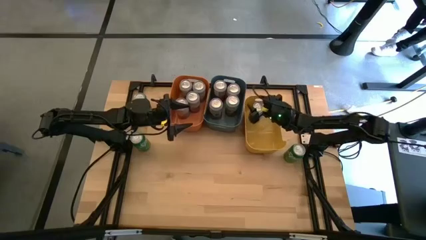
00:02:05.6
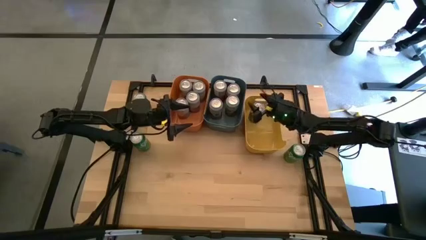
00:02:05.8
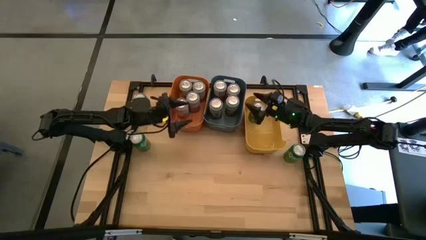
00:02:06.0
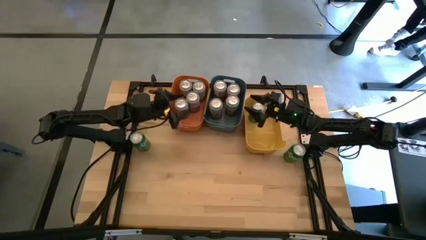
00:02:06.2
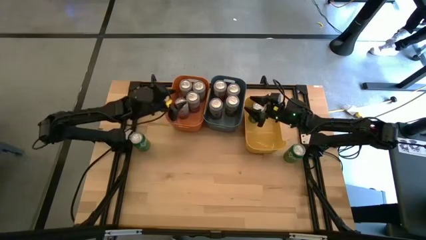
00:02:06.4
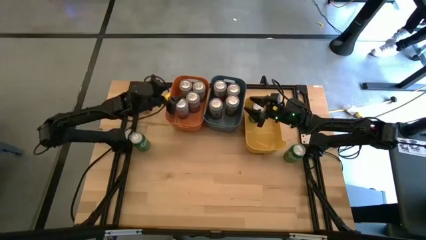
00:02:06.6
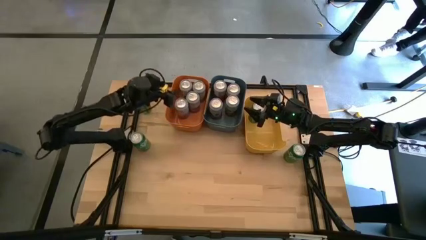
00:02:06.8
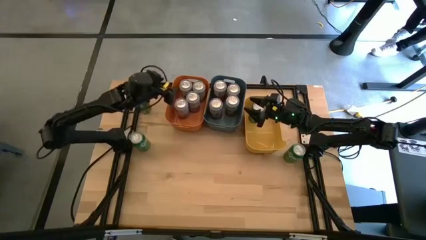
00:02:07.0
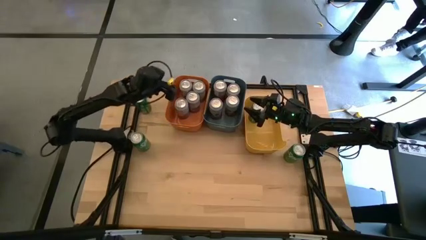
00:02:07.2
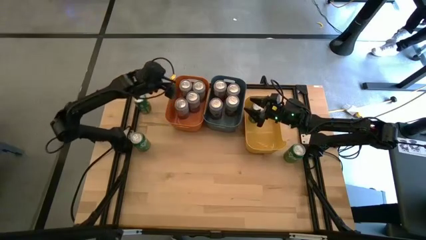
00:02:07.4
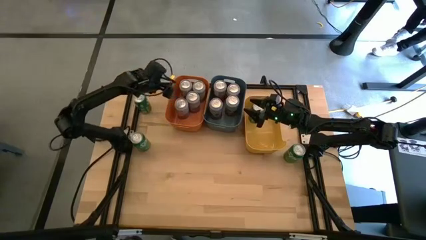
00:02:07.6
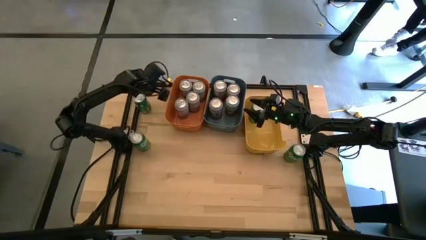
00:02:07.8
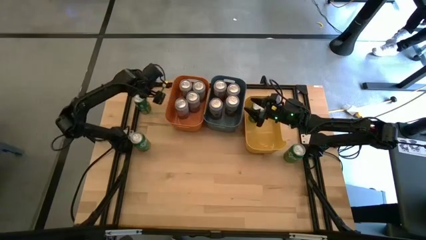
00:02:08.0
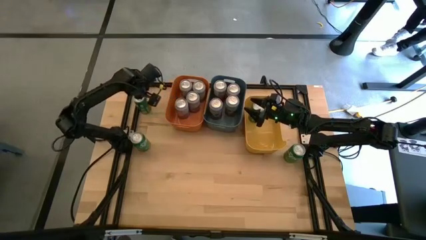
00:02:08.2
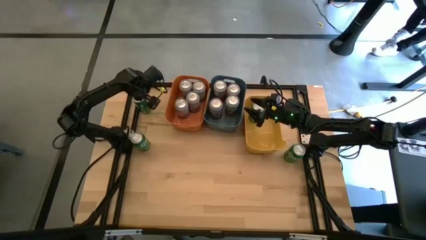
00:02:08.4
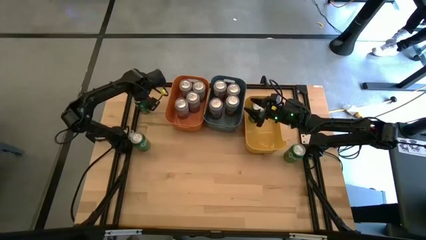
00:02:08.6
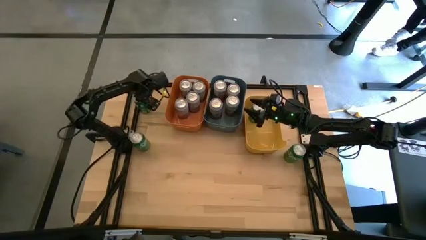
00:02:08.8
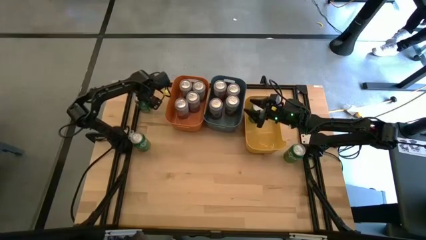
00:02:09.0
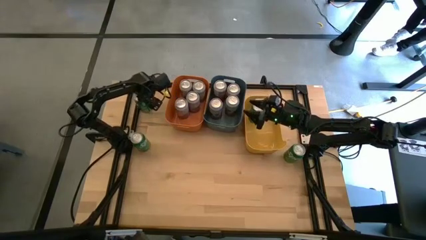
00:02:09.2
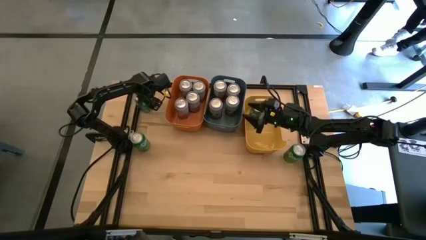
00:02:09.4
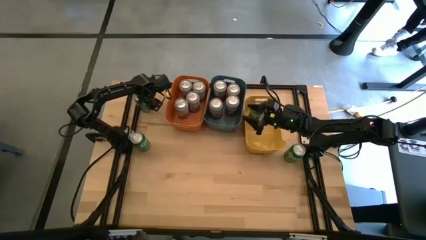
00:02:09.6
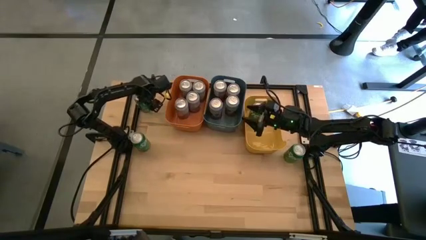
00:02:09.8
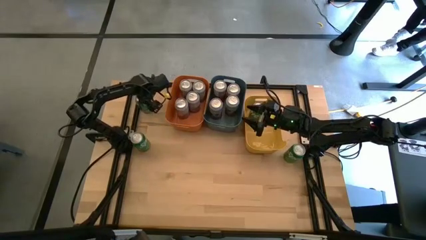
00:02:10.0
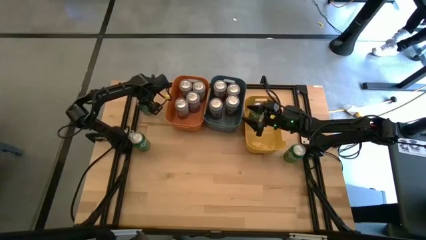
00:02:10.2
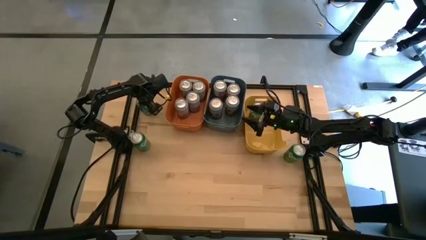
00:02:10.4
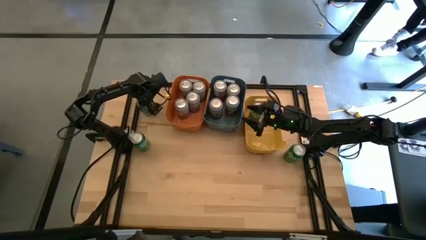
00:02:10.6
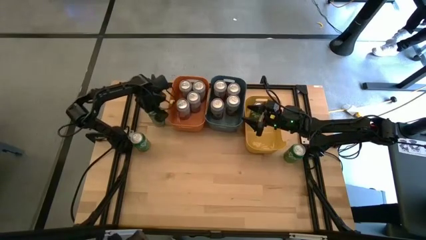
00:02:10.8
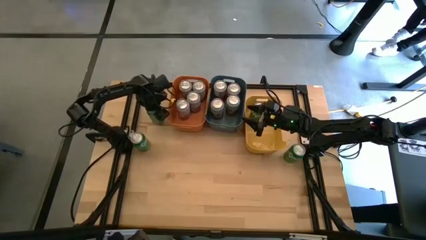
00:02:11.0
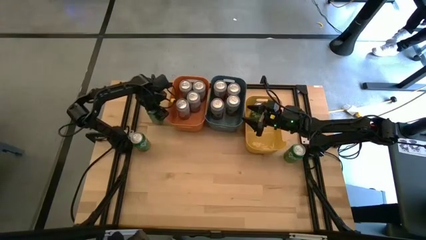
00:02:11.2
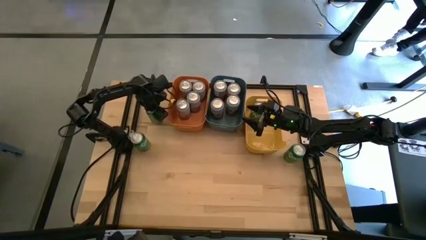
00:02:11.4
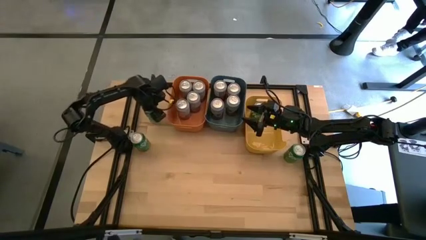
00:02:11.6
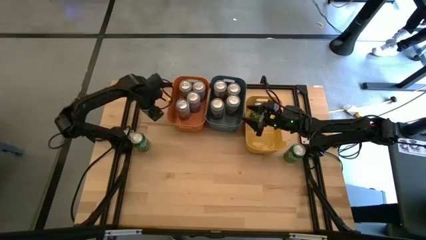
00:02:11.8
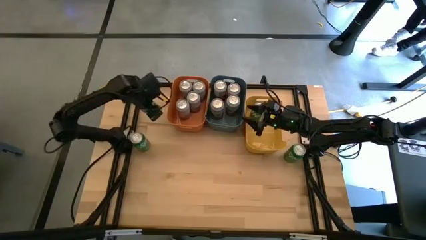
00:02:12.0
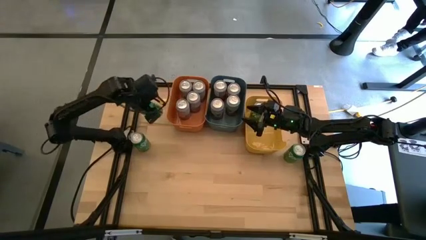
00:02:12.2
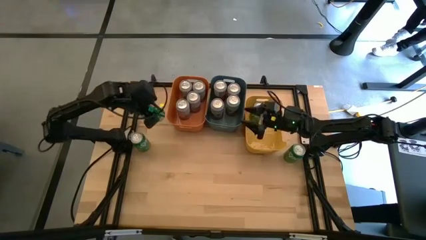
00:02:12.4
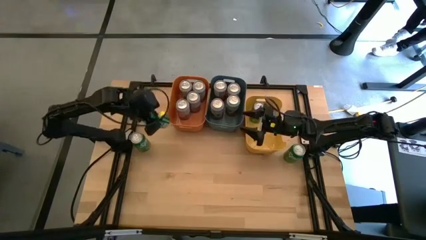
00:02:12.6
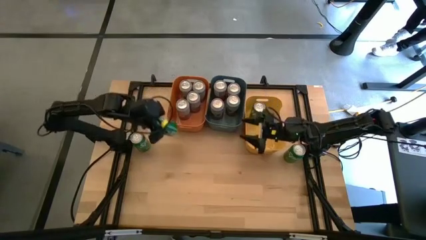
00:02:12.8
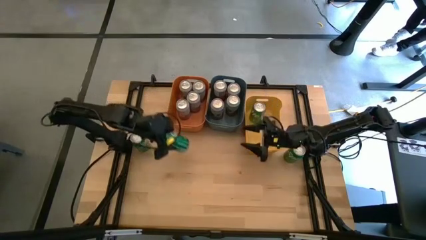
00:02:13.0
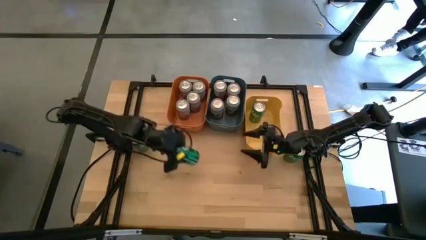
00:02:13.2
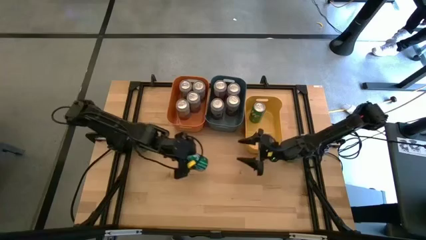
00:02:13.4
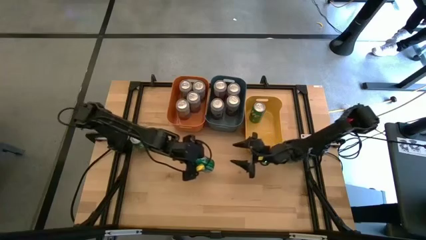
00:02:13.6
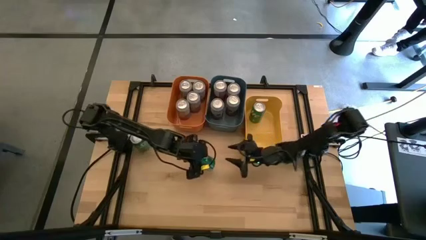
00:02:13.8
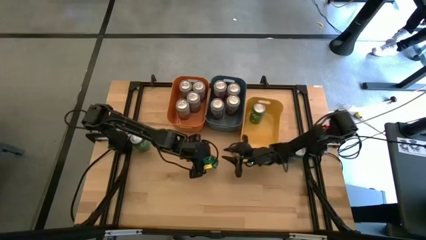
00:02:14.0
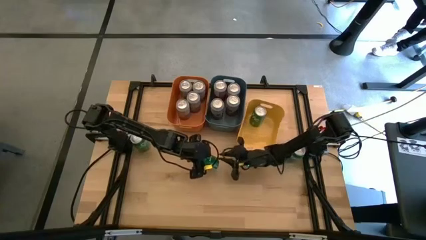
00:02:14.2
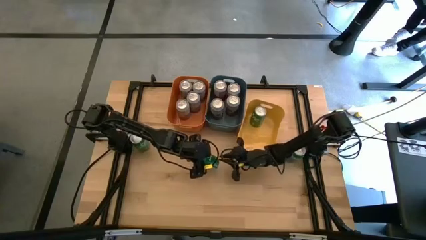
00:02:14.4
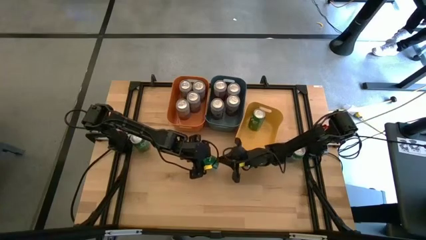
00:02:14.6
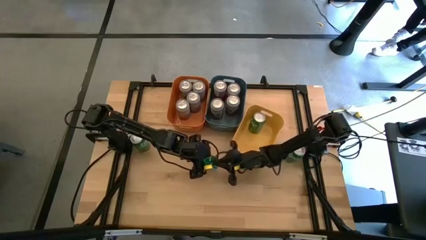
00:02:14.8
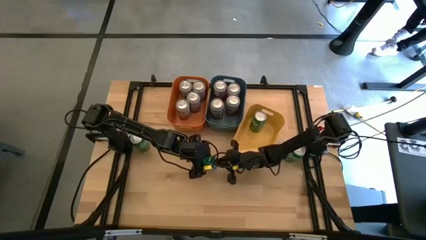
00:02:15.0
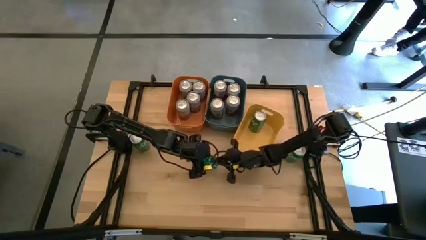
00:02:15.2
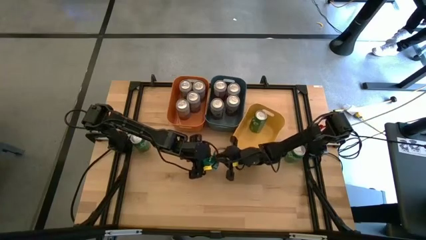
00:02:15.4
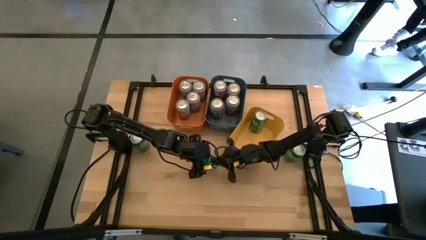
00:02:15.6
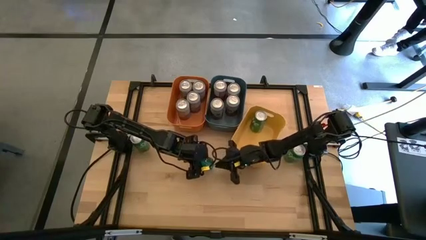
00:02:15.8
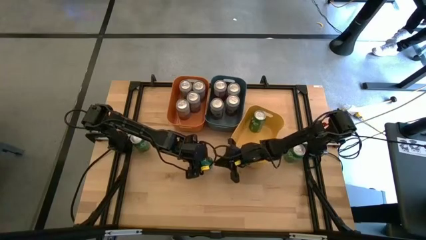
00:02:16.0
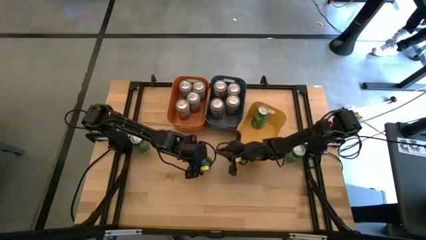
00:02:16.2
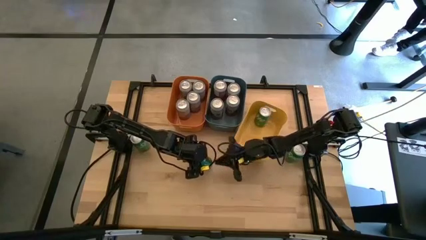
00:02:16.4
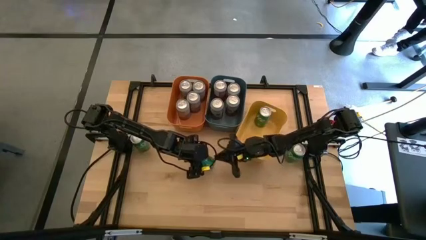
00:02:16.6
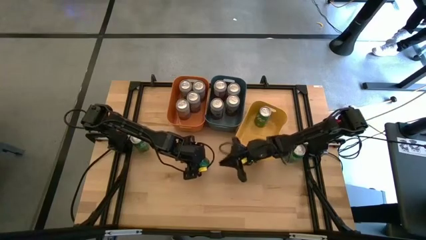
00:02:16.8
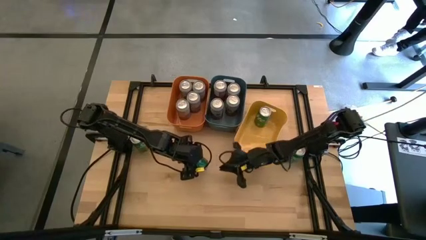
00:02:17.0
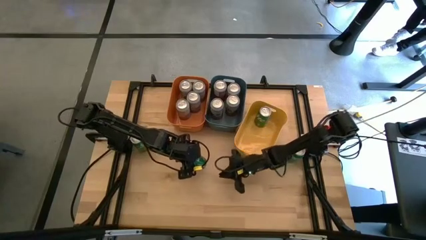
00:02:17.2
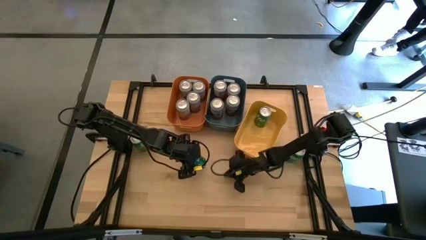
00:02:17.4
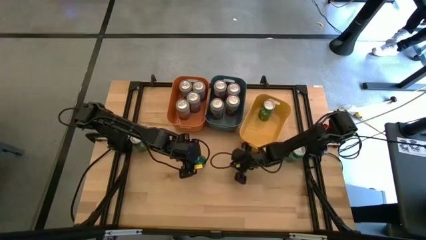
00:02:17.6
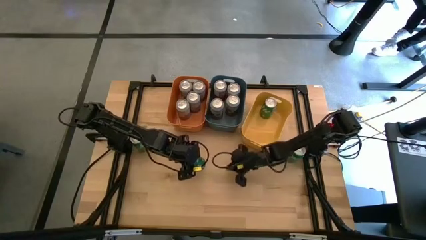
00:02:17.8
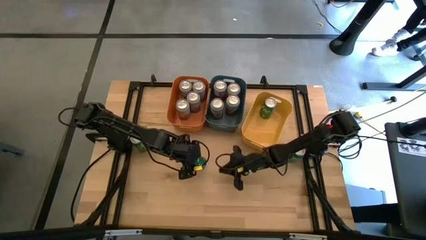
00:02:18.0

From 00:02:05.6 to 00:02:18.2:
Task: Sort soda cans
Put the top green soda can into the yellow bin
